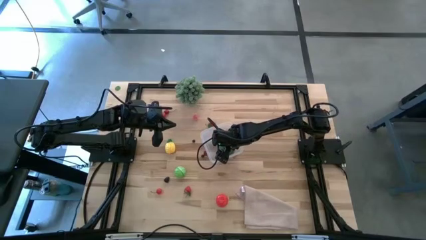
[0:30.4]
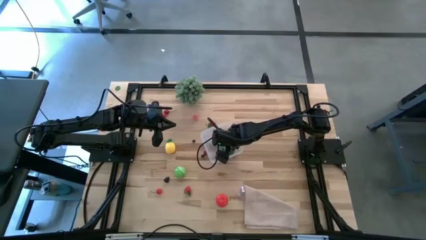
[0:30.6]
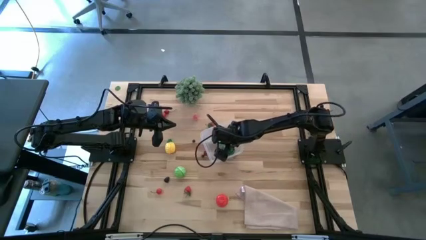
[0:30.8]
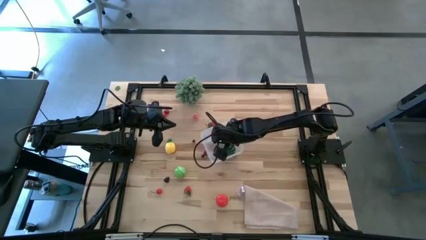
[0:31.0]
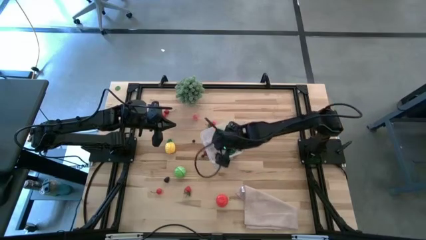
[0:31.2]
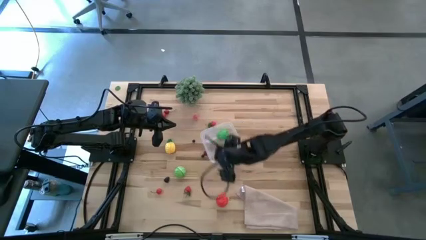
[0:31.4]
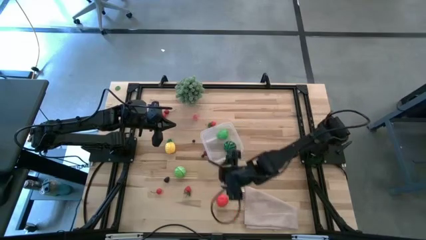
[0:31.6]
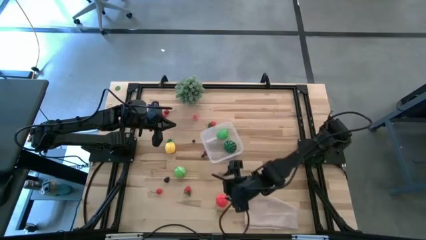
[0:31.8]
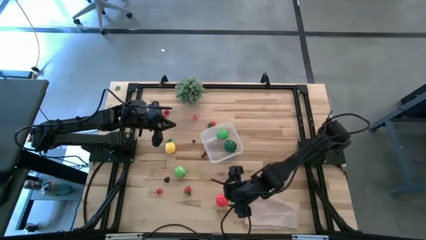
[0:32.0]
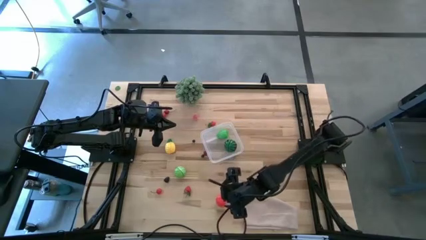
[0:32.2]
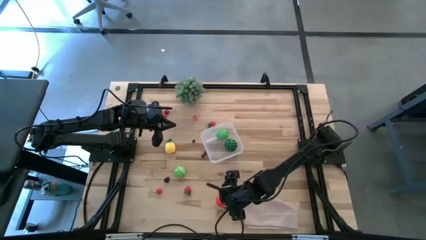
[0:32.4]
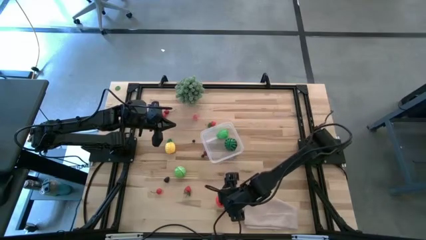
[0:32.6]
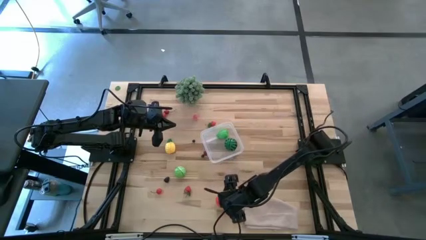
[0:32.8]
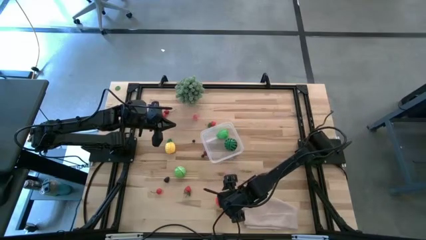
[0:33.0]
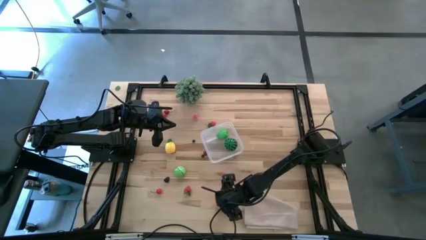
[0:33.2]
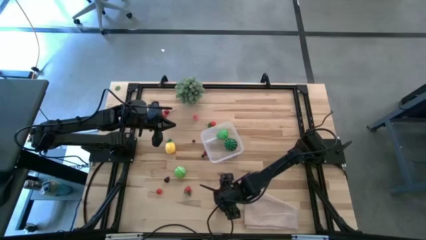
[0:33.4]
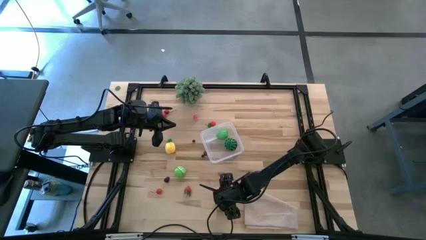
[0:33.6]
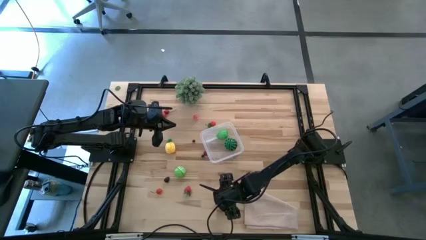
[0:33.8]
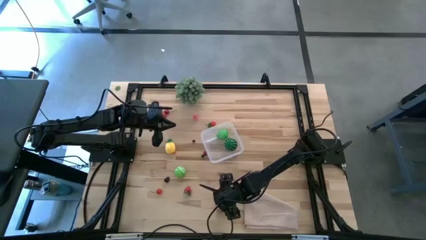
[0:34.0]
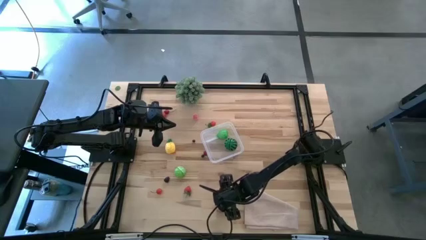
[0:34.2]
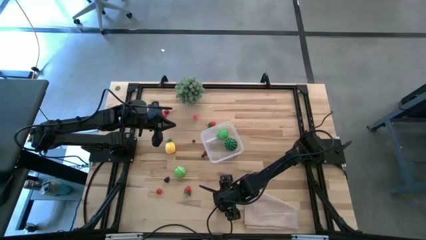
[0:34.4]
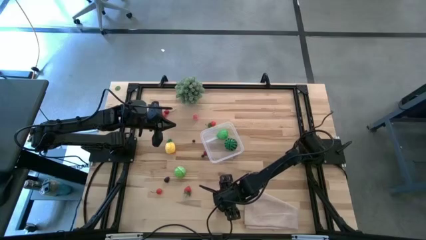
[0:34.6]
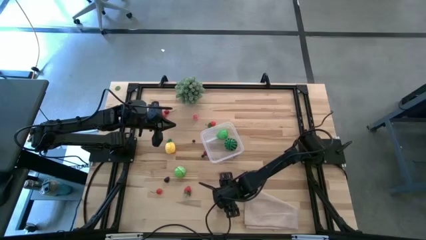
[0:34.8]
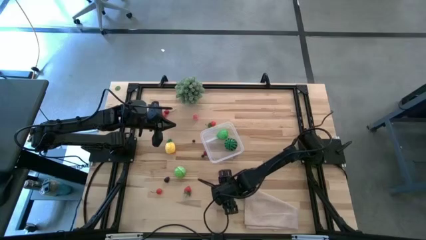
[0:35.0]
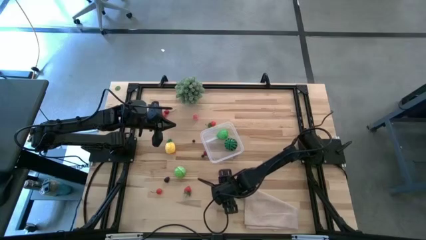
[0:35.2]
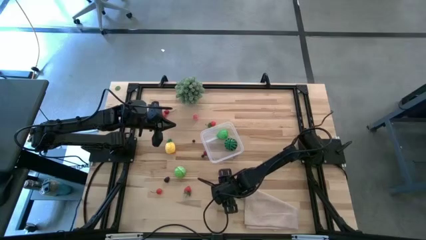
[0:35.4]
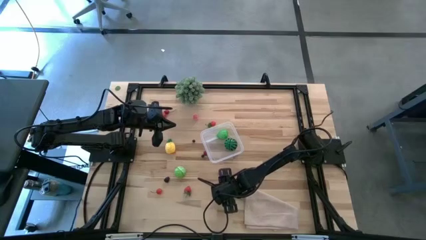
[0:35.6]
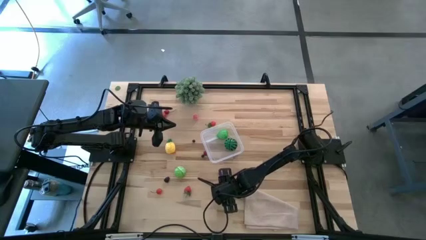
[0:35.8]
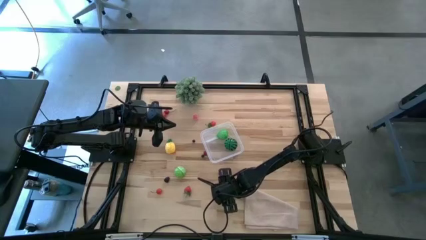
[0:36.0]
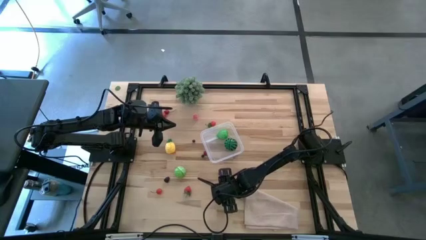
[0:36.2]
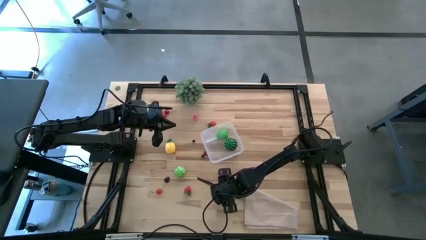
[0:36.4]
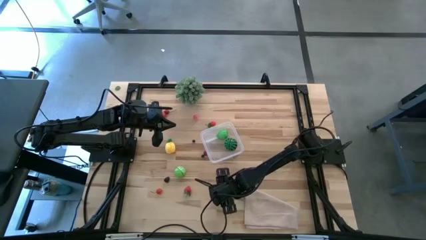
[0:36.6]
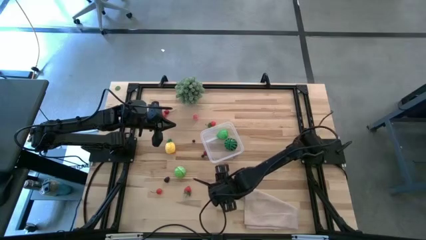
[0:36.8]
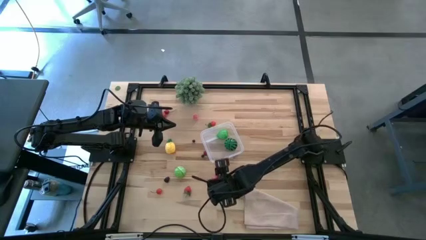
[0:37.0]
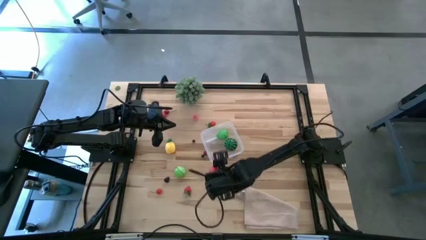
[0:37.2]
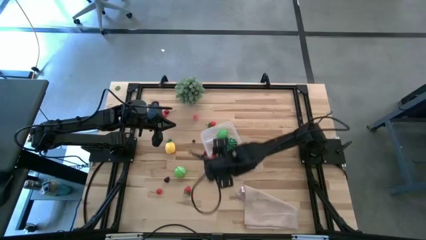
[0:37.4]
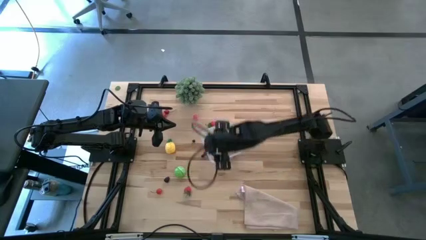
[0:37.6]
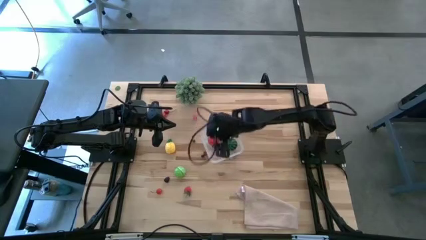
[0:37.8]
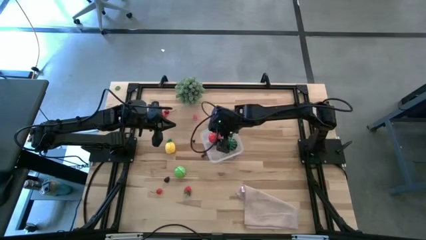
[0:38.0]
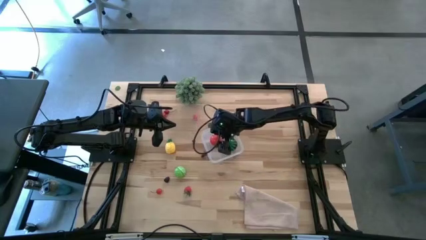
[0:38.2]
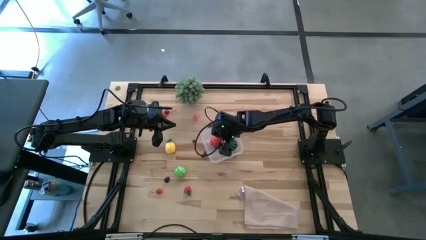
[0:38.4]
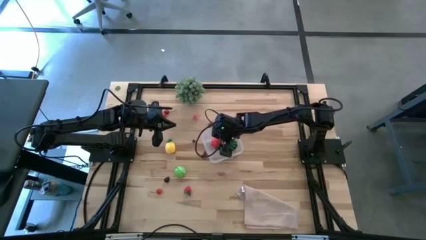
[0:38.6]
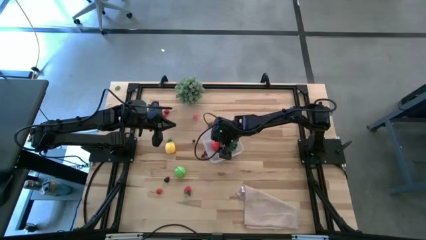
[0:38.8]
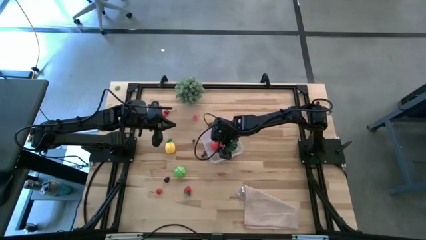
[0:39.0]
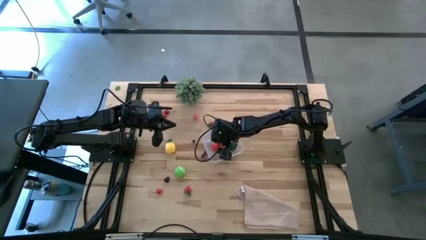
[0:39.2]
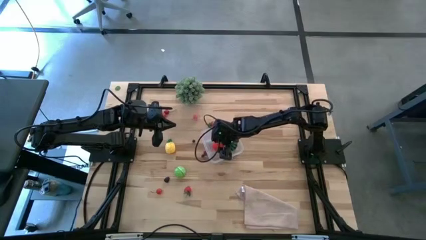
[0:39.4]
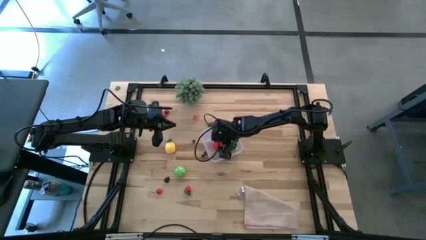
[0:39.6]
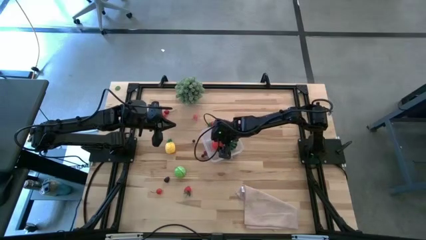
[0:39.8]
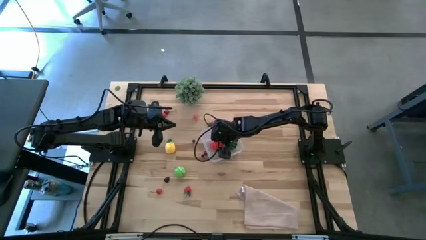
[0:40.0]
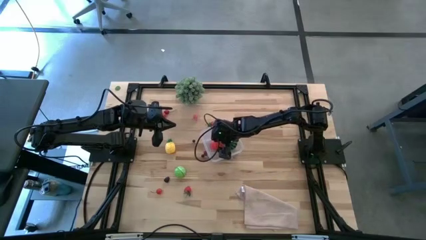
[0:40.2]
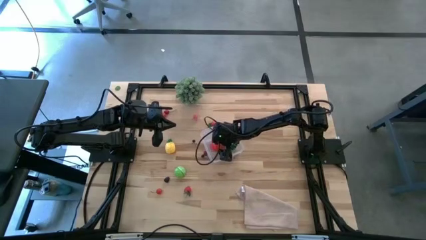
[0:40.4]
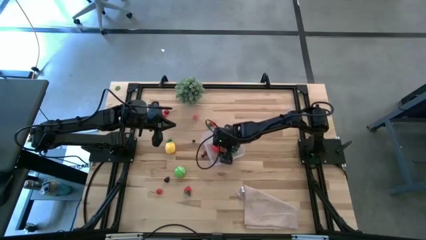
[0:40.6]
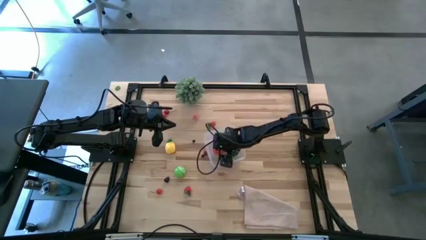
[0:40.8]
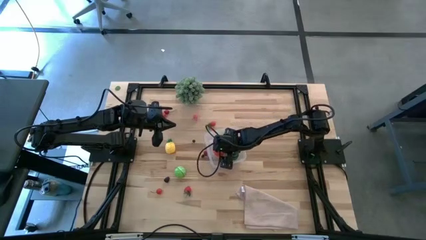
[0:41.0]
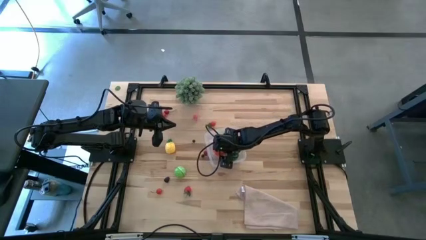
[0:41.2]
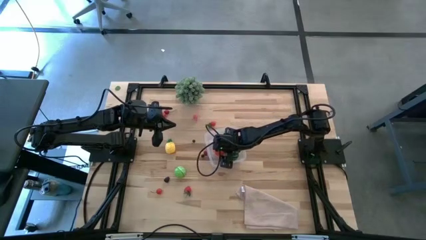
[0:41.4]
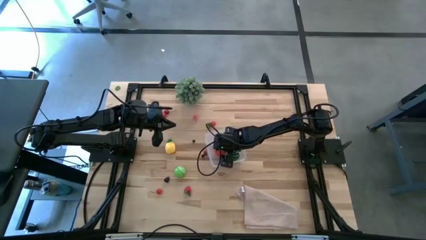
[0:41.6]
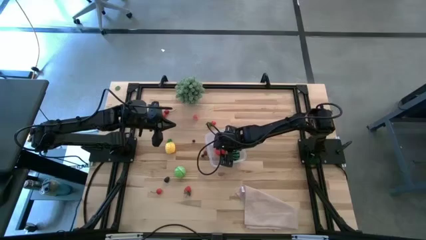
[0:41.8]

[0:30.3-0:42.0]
Task: Pick and placing Produce into tupperware
Put the red tomato into the transparent bin

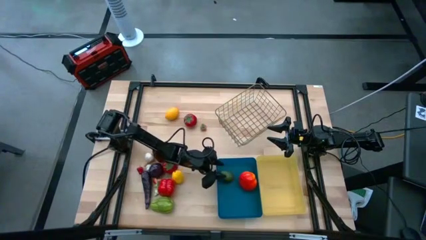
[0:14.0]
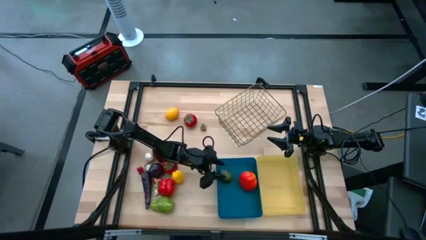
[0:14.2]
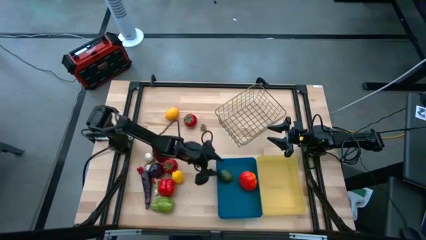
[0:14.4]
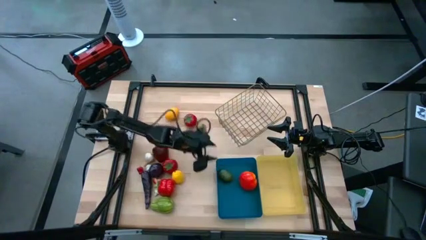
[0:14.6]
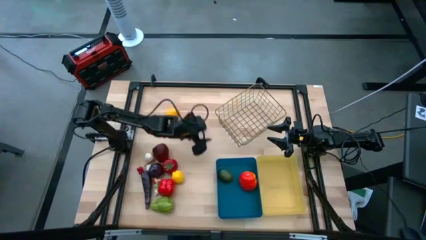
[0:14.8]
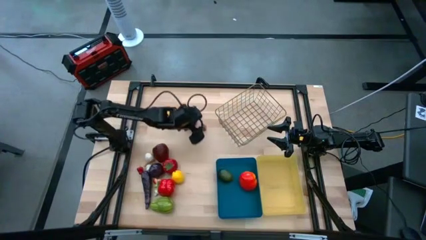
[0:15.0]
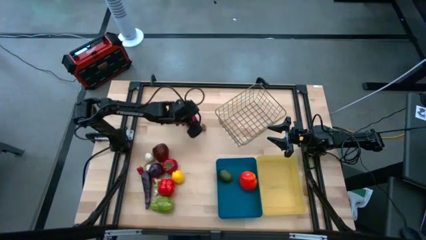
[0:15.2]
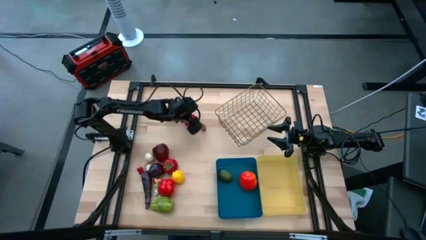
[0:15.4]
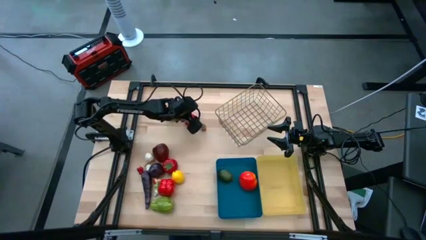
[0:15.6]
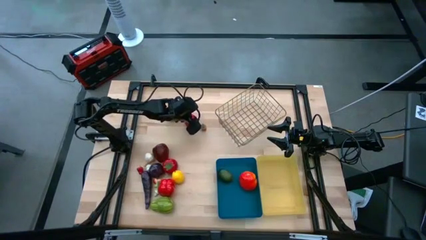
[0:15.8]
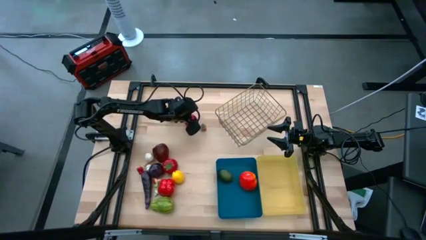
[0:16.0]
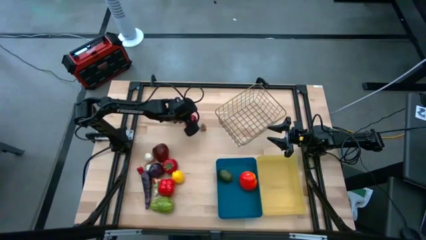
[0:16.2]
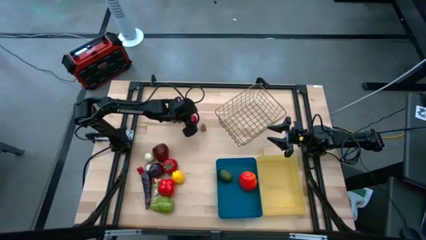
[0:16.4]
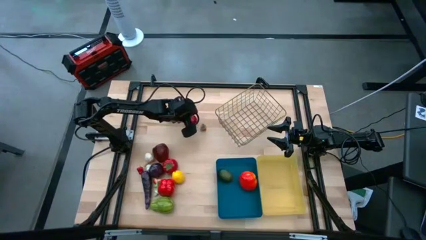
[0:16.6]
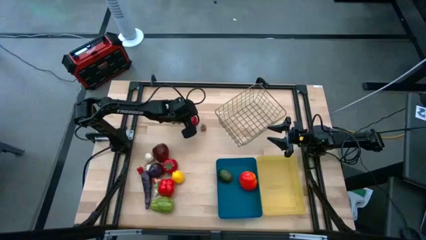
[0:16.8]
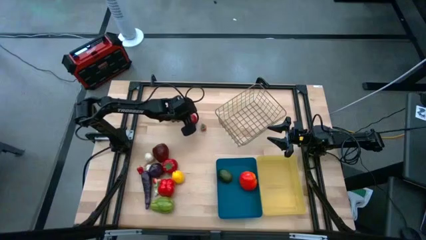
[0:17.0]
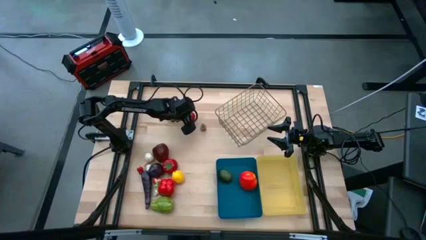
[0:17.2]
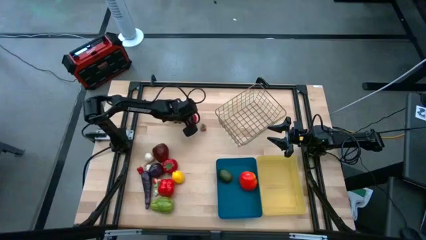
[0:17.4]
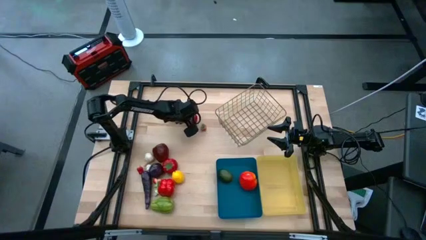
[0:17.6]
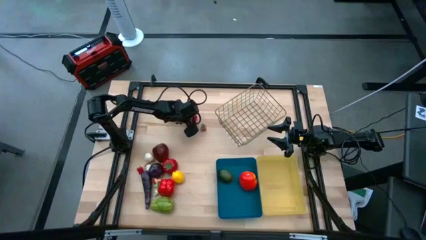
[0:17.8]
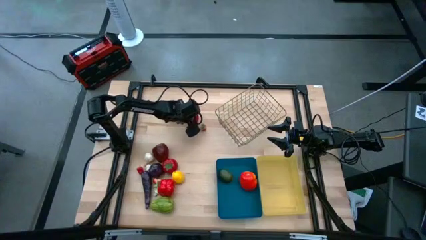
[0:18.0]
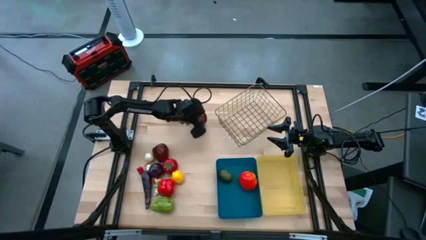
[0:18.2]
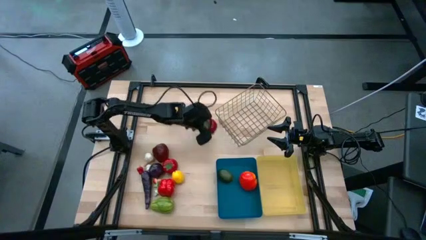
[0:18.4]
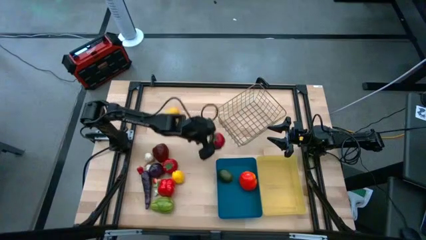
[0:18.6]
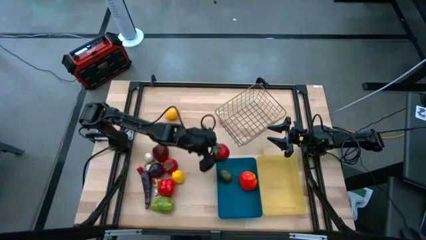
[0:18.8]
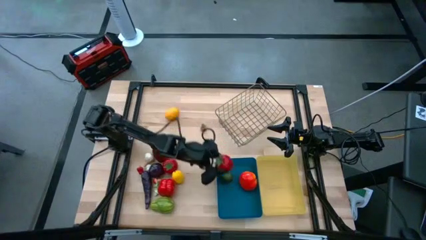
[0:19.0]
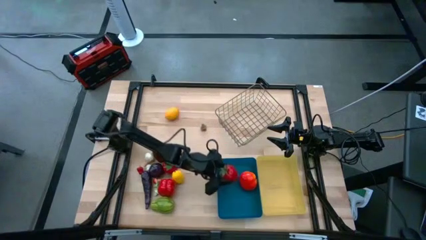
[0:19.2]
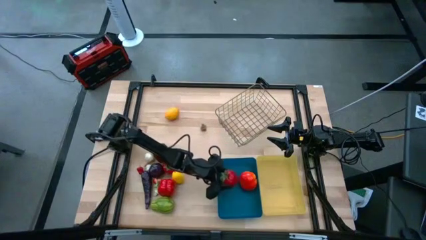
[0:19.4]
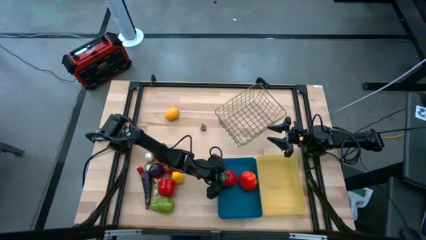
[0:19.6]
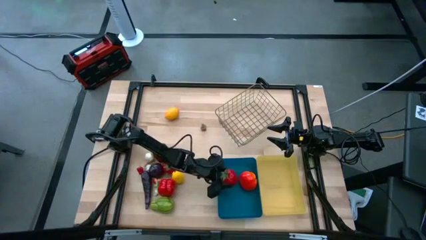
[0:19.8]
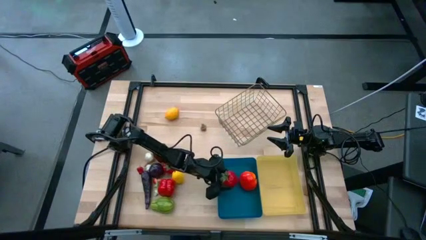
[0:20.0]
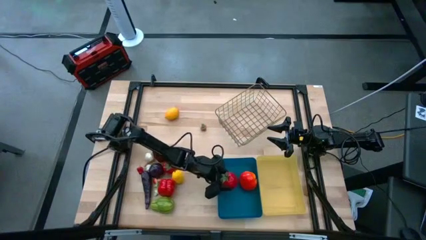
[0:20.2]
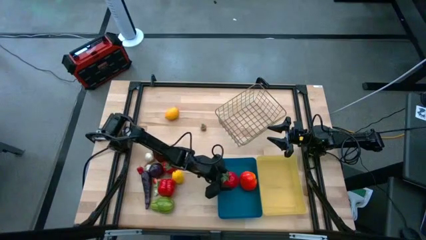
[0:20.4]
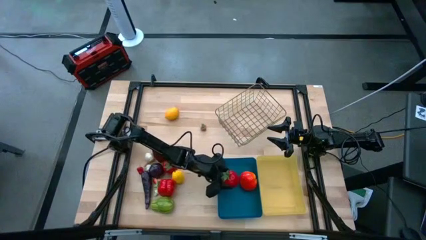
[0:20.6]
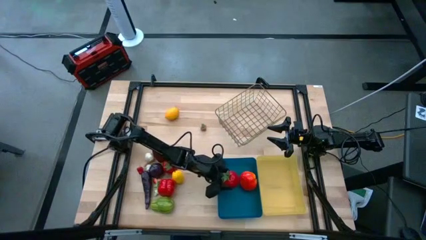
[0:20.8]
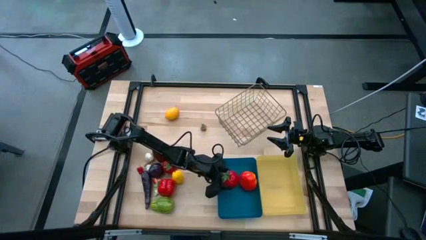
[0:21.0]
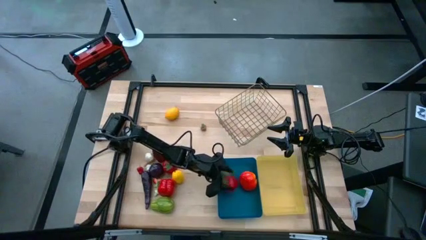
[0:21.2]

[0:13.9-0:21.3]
Task: Sort produce into baskets
Put the top red tomato into the blue bin
